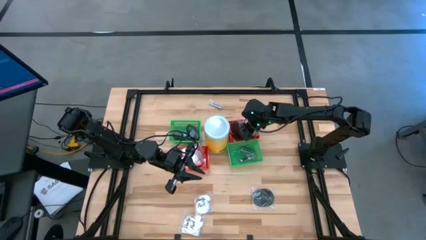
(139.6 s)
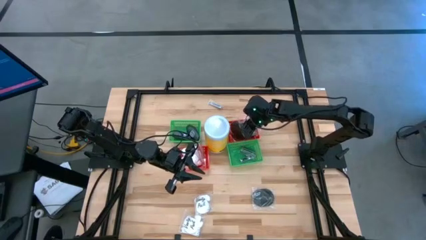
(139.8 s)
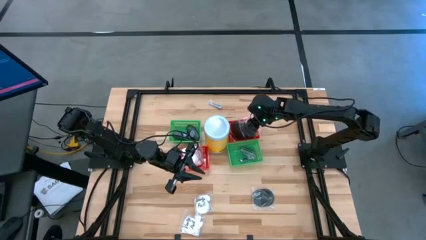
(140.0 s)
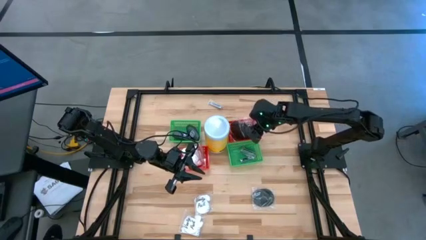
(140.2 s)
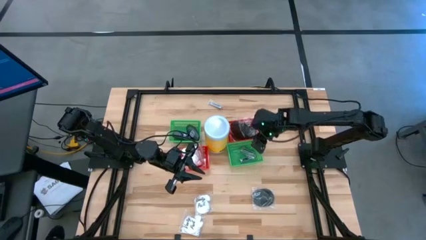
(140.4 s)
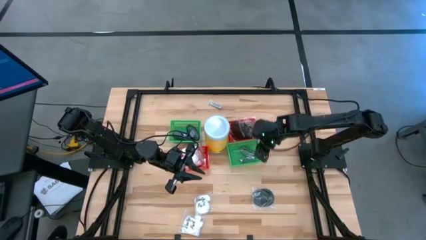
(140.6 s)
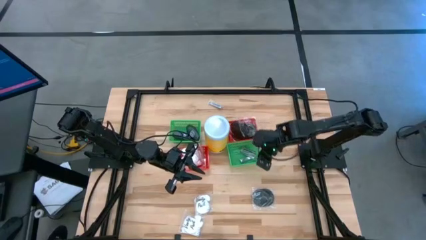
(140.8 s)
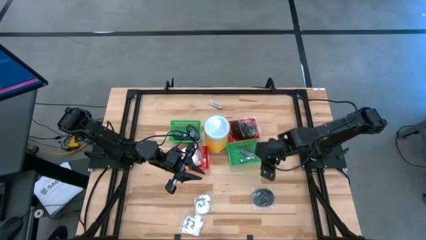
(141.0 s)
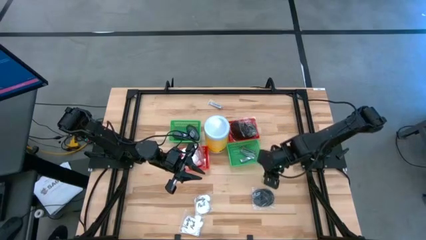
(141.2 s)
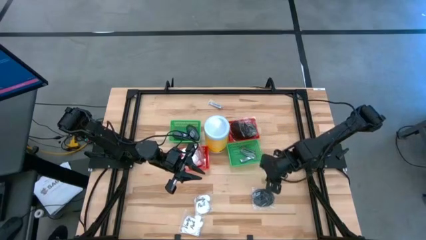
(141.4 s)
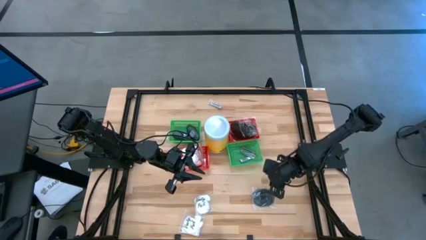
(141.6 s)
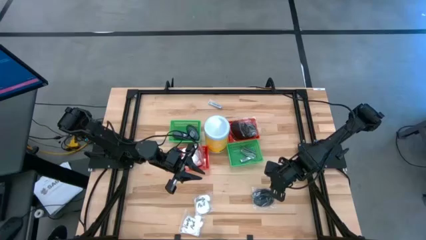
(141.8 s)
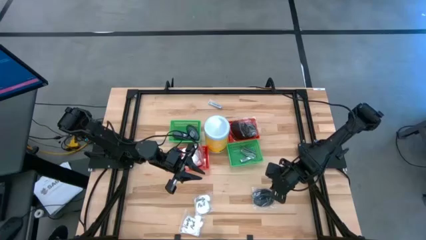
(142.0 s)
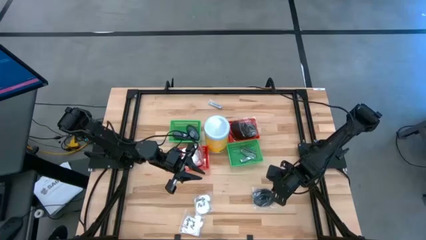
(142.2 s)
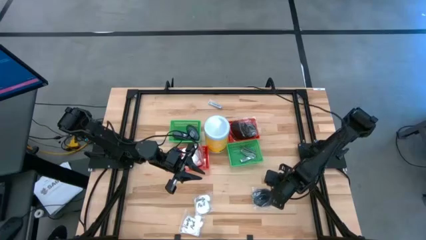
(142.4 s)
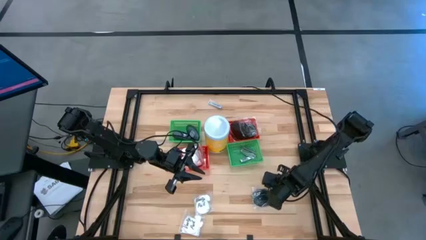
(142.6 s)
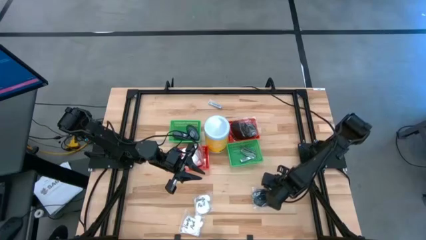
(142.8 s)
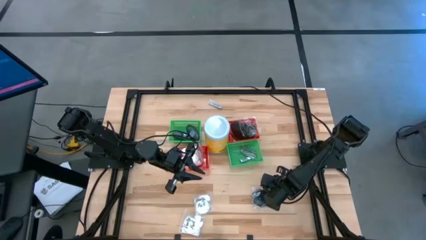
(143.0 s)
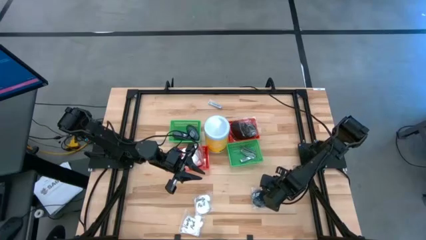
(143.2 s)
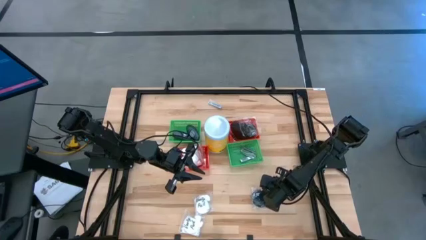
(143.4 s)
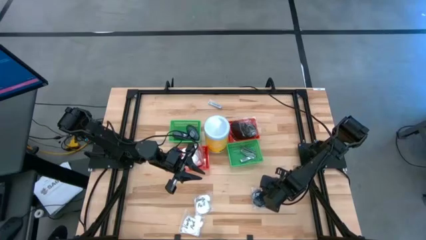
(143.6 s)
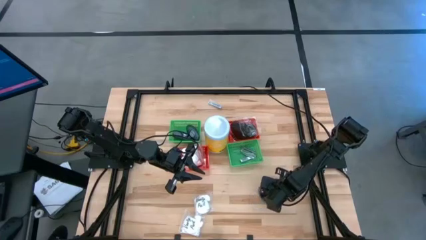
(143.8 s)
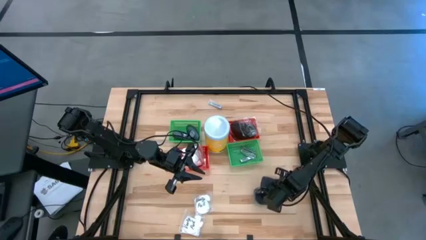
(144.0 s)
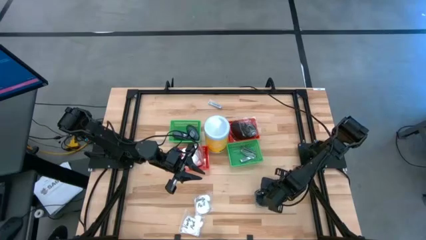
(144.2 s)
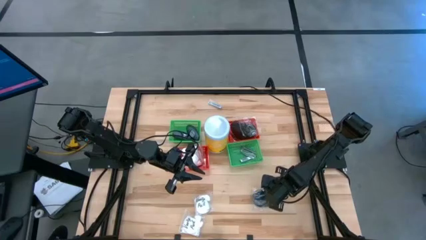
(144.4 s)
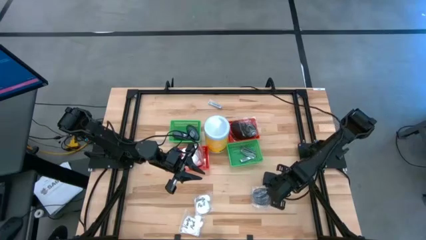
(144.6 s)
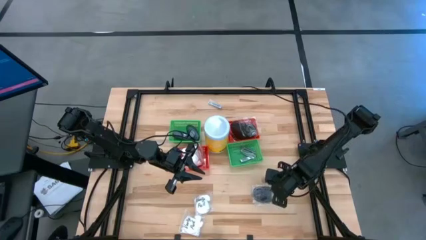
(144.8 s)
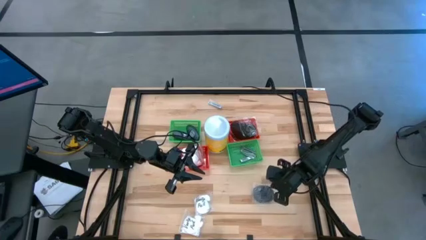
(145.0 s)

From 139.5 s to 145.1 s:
Task: Pick & Place Travel size toiletries
Put the black hair brush into the right red bin

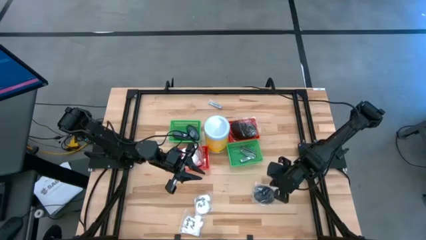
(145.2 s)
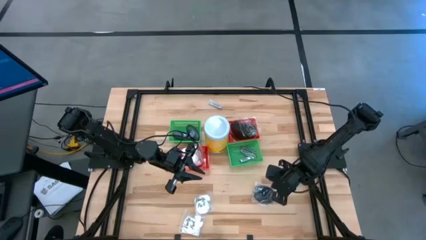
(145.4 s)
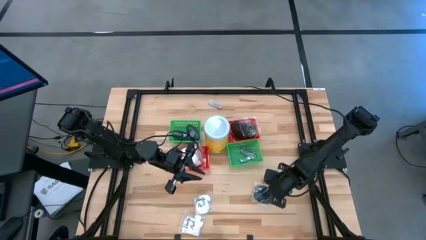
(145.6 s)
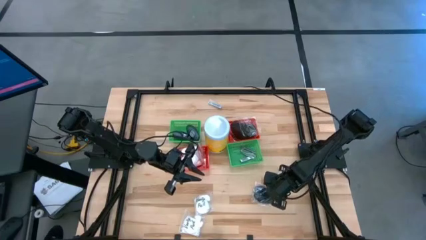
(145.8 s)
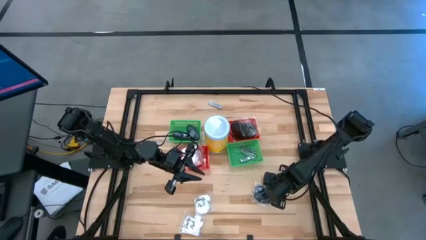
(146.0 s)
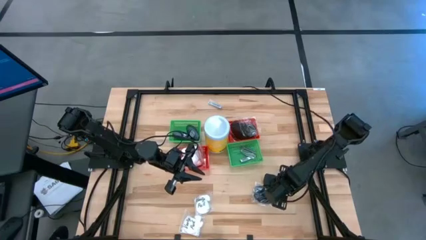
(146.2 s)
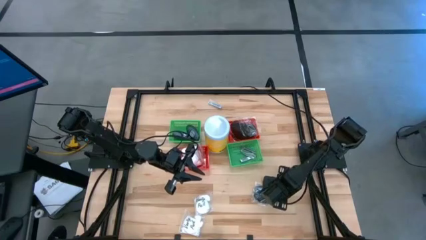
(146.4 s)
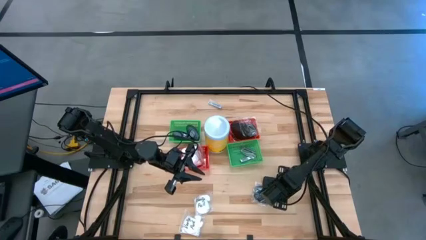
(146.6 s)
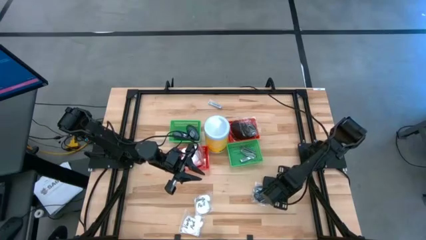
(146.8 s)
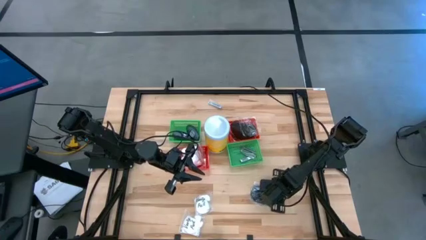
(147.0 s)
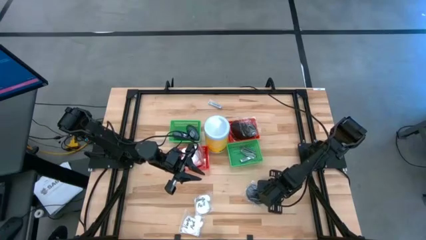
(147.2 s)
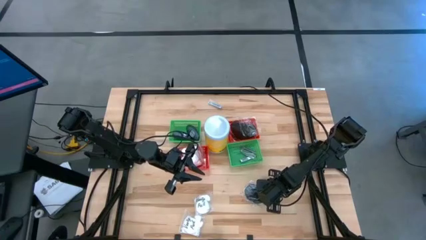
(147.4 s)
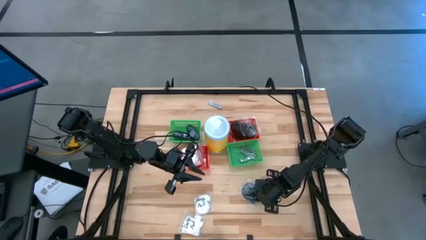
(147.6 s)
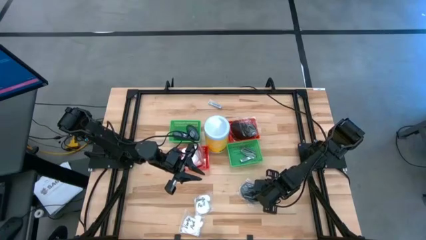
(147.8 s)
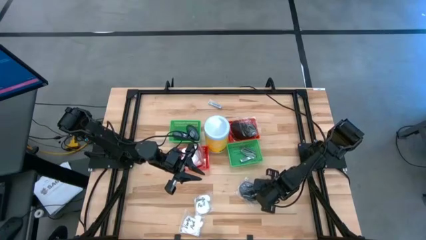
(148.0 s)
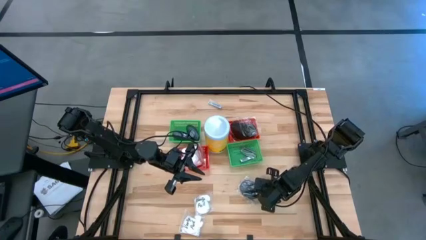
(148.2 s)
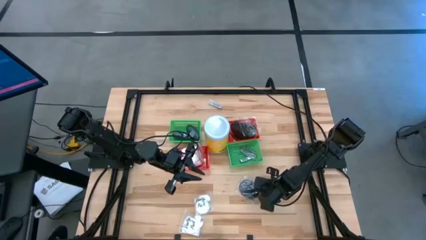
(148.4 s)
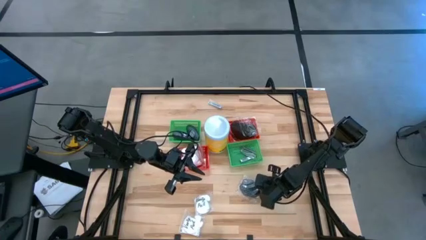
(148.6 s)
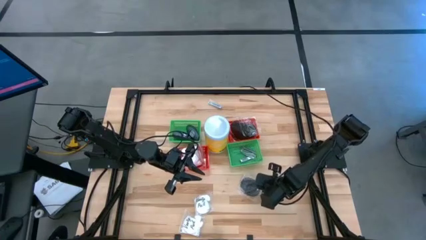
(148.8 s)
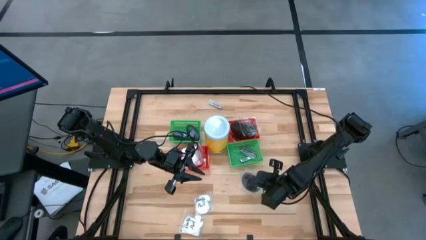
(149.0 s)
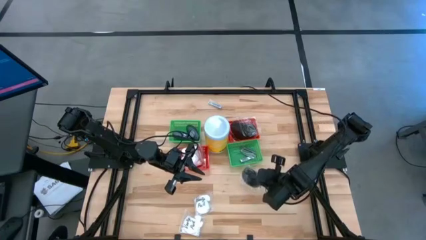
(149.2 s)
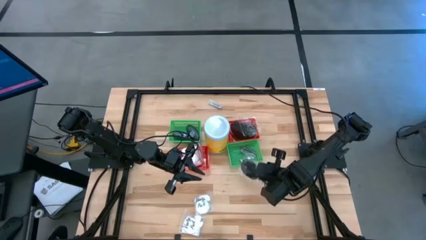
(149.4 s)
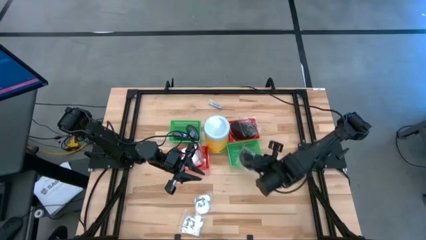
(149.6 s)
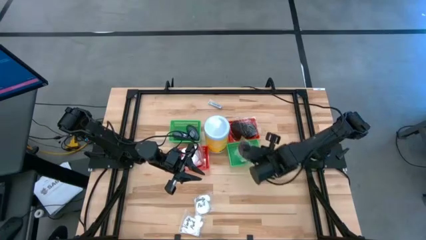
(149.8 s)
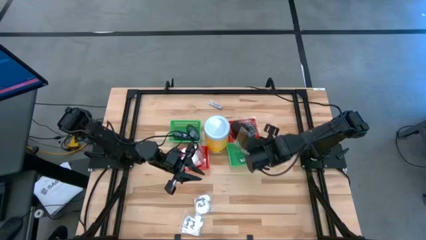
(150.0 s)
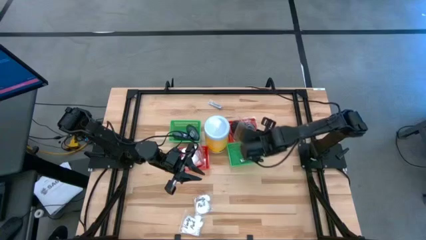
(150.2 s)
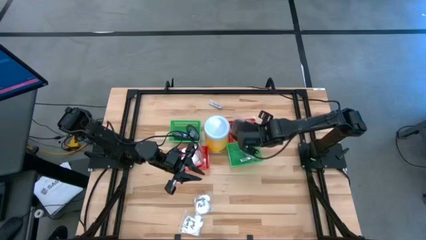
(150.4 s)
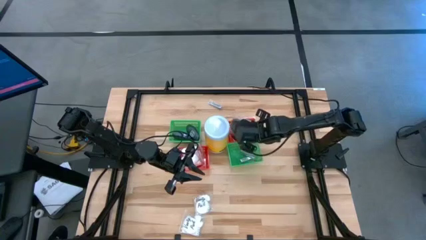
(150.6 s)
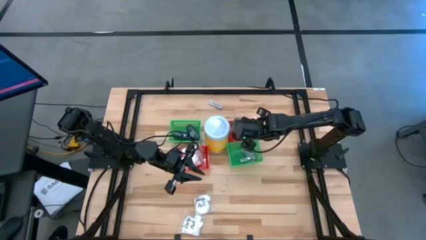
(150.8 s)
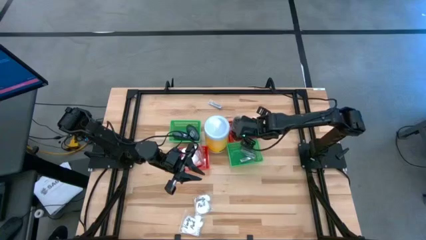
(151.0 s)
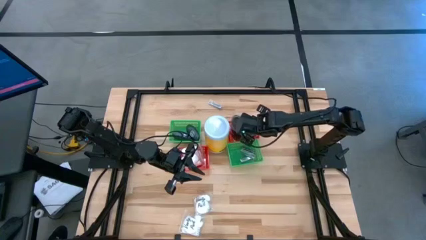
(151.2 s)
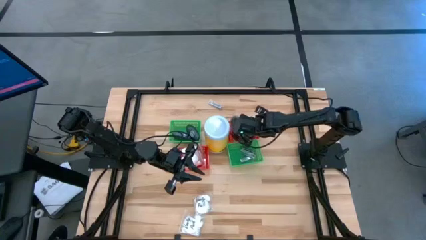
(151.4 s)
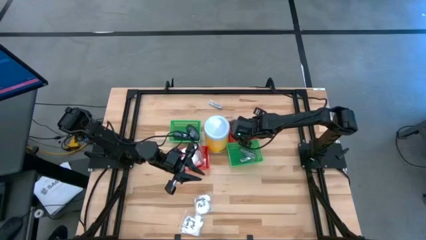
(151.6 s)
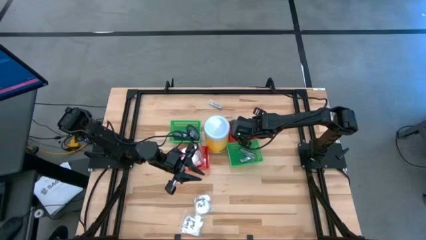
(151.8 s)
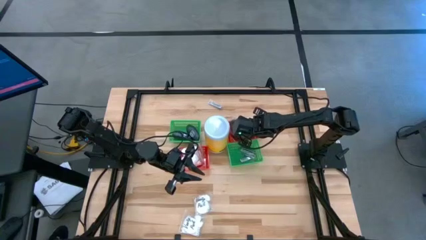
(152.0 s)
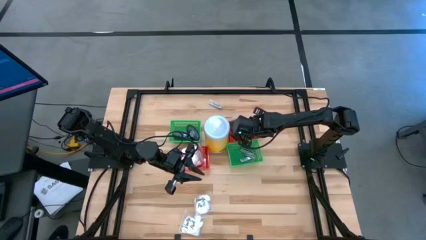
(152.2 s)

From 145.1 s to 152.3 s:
Put the black hair brush into the right red bin

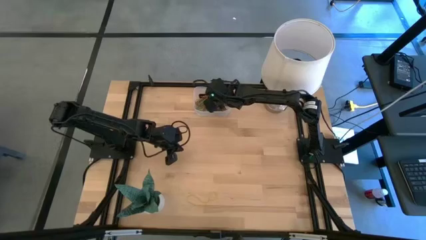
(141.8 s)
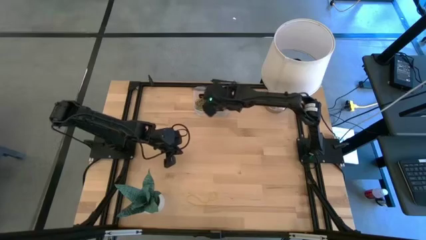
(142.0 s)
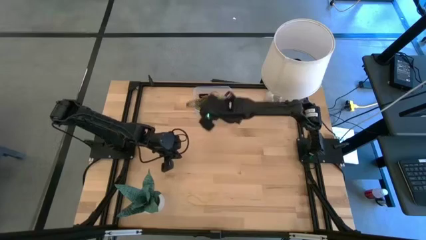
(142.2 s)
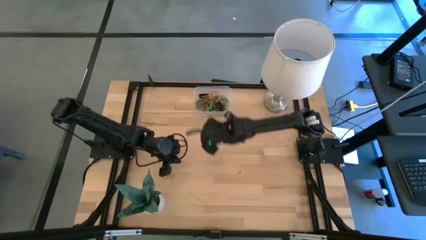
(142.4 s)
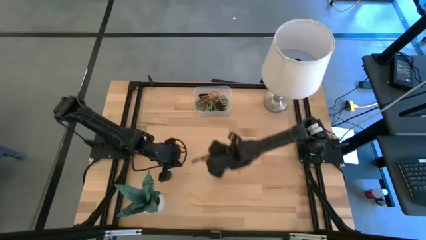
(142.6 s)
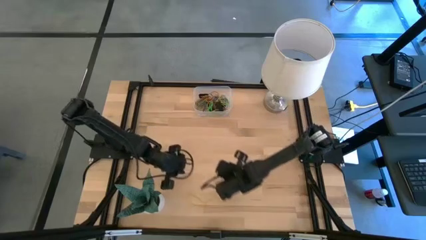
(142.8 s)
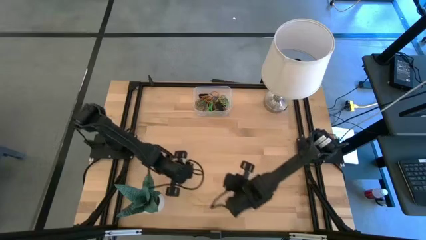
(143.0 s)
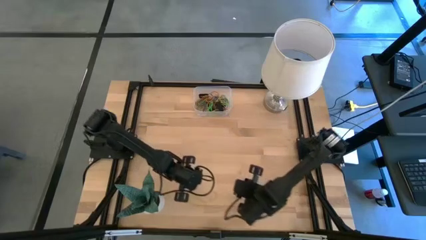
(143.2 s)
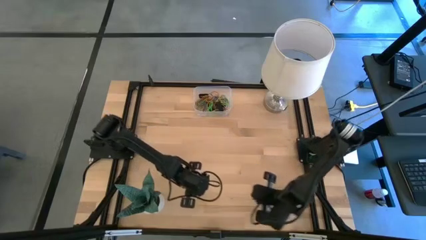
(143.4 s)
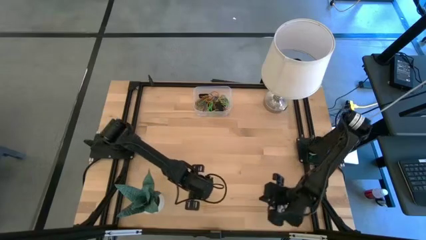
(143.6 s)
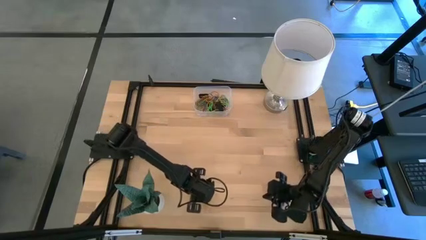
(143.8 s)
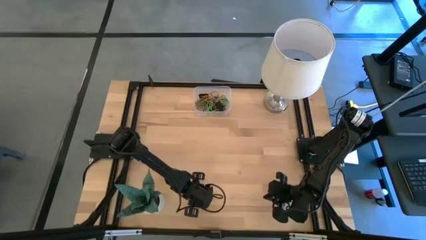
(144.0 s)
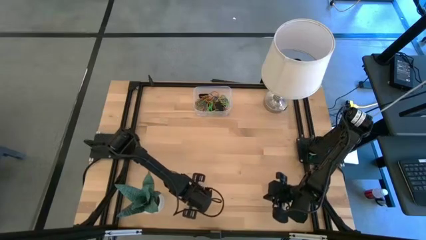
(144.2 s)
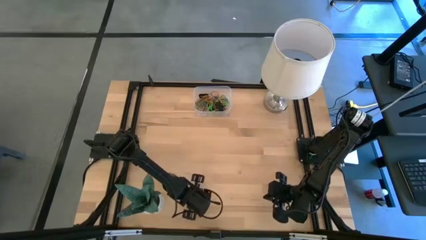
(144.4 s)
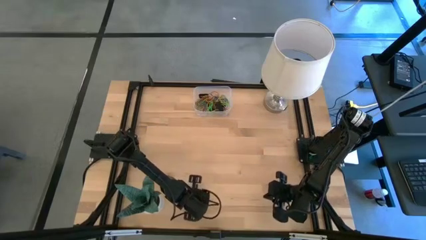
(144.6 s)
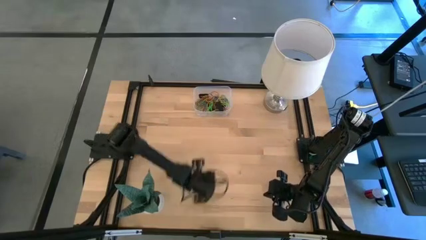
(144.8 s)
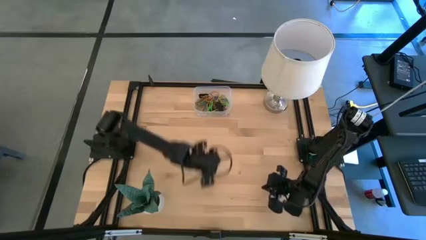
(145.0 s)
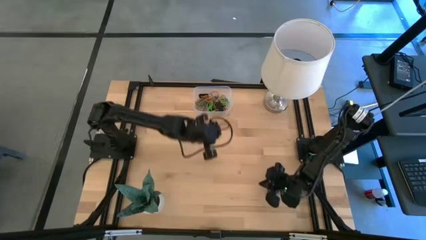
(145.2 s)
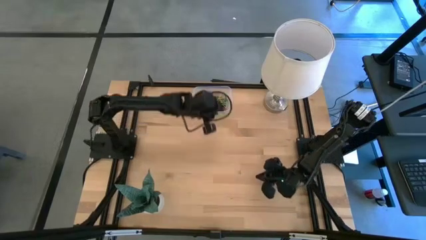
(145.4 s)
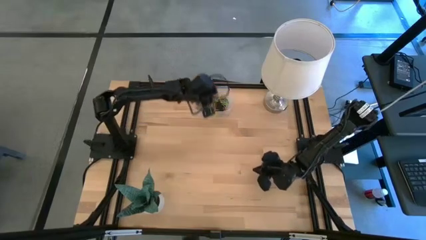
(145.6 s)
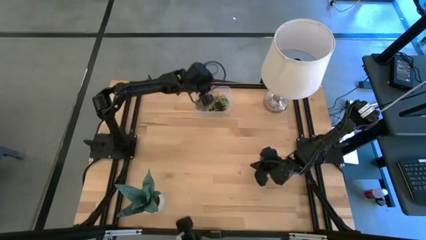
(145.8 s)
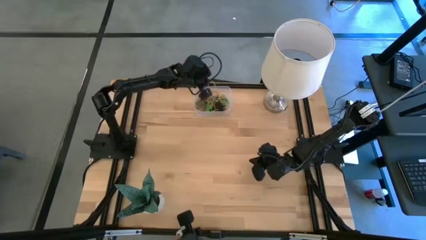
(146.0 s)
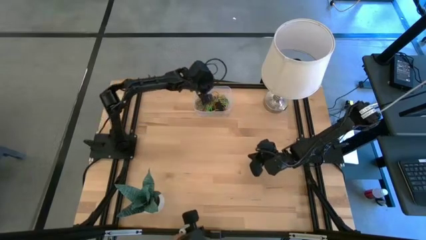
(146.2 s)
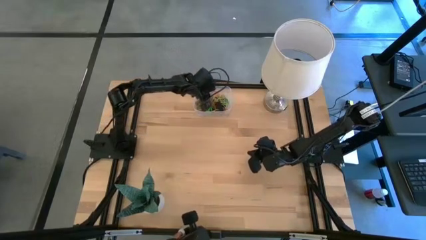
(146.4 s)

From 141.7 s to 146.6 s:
Task: Pick and place rubber bands into bin
Put the yellow rubber band into the transparent bin
